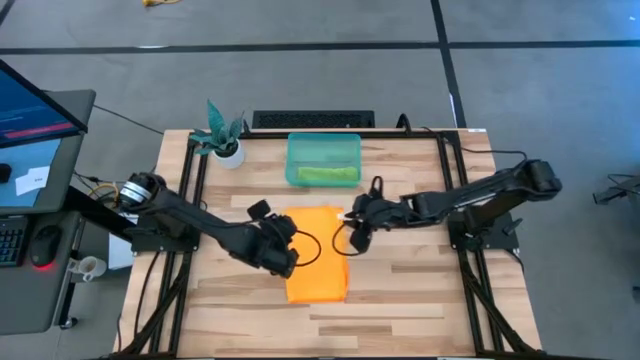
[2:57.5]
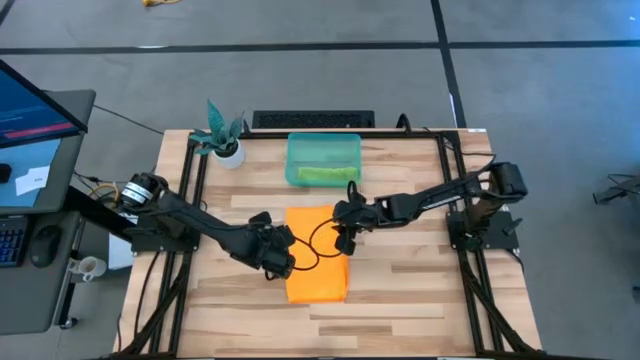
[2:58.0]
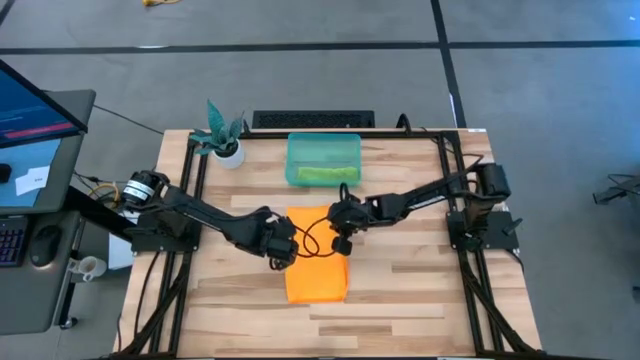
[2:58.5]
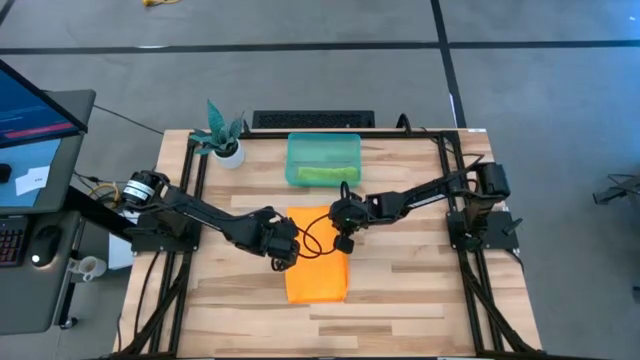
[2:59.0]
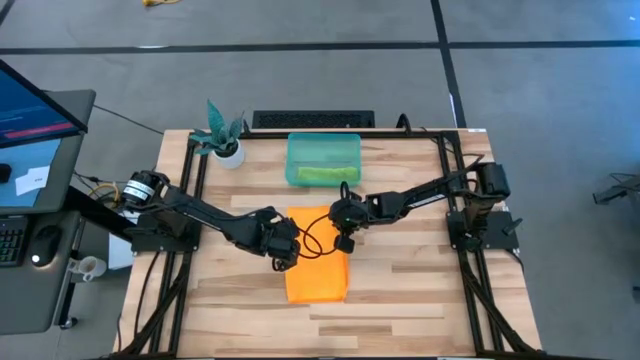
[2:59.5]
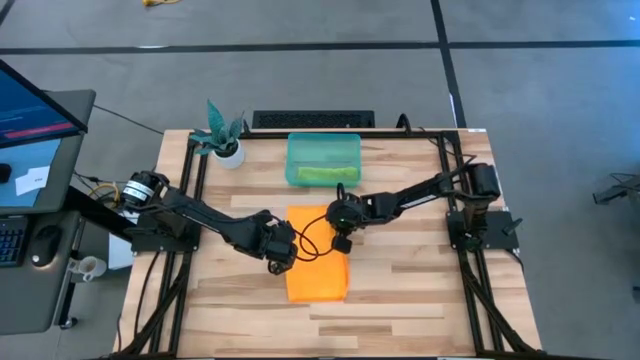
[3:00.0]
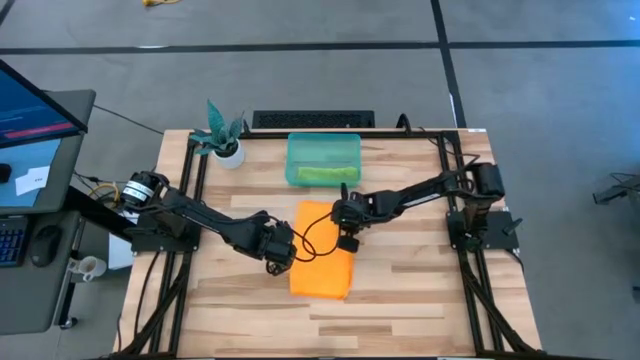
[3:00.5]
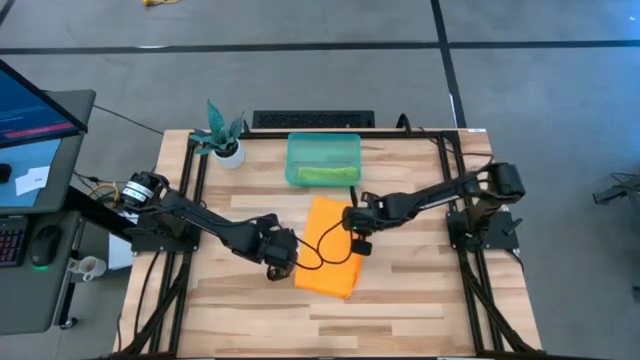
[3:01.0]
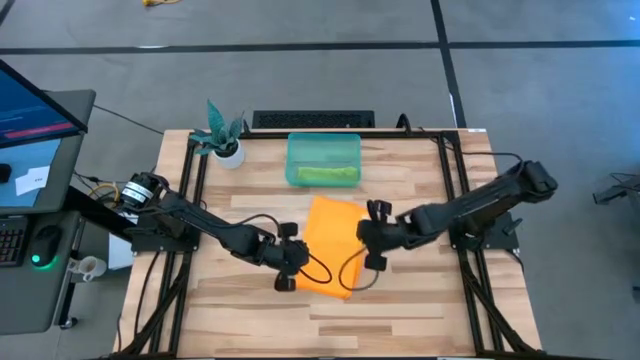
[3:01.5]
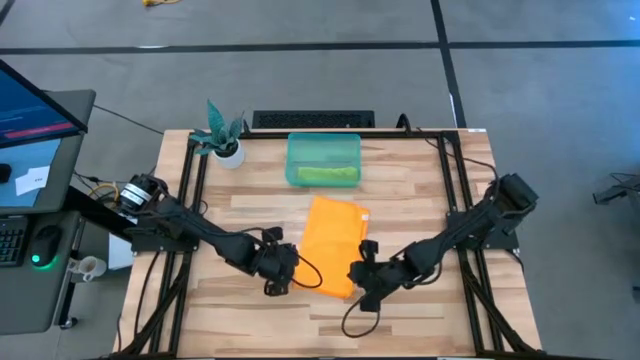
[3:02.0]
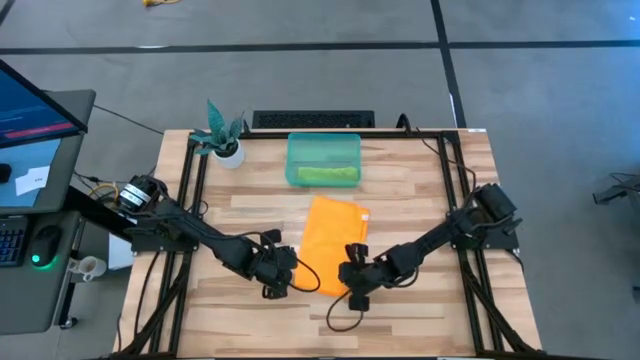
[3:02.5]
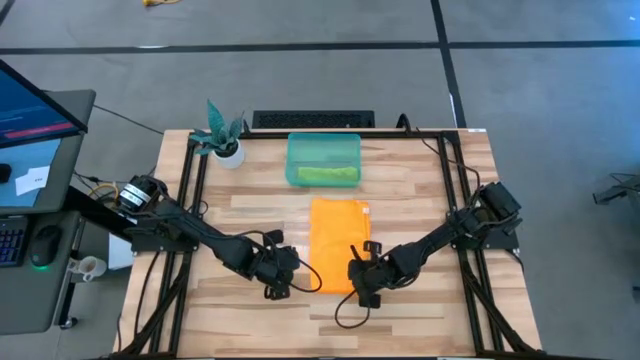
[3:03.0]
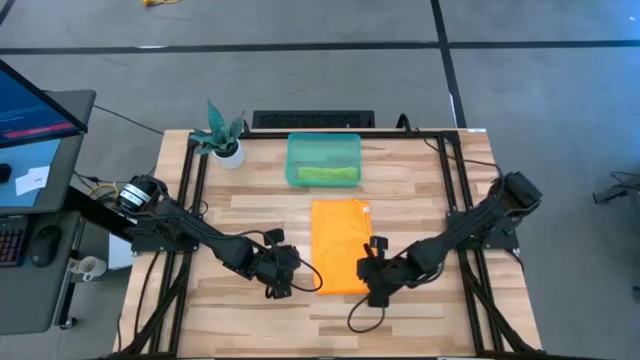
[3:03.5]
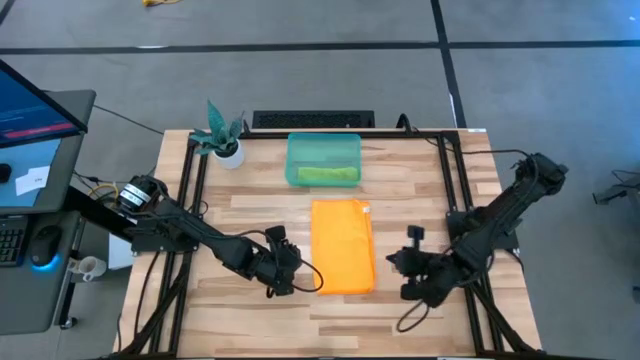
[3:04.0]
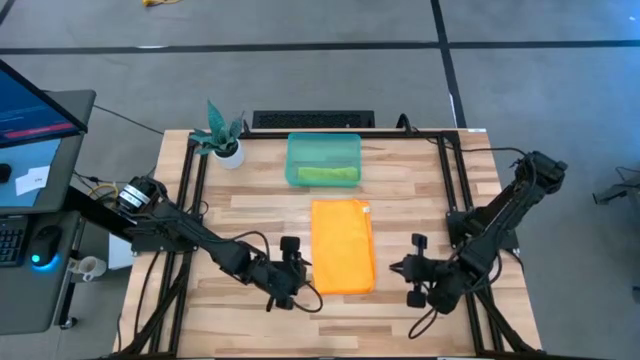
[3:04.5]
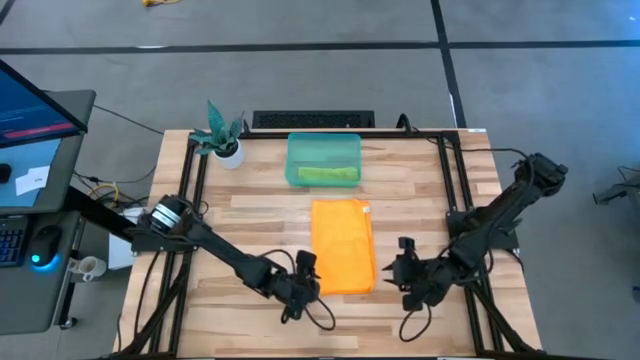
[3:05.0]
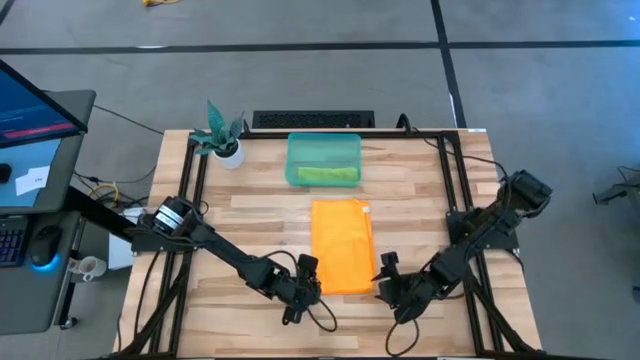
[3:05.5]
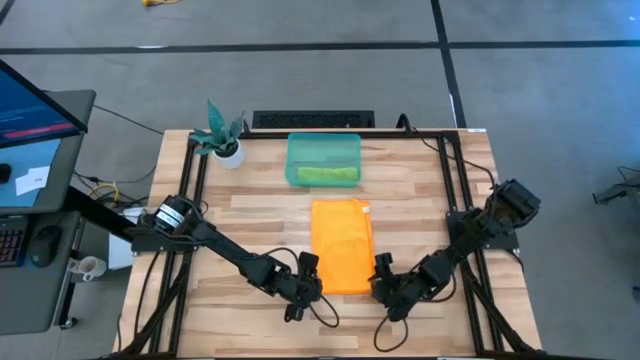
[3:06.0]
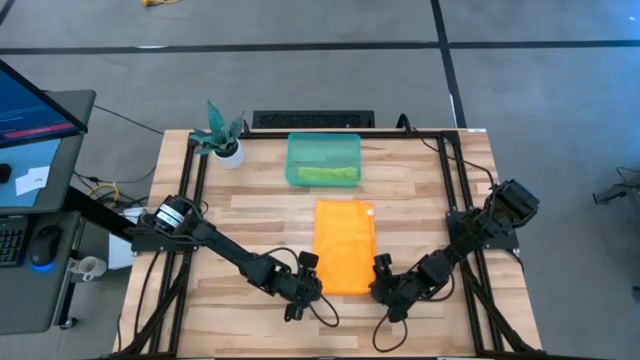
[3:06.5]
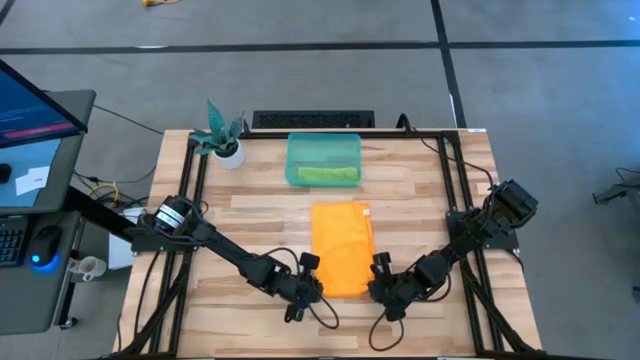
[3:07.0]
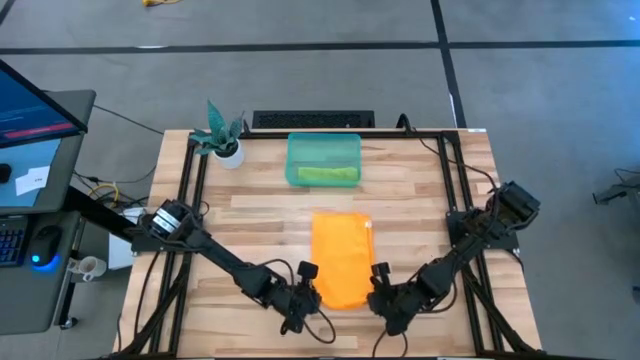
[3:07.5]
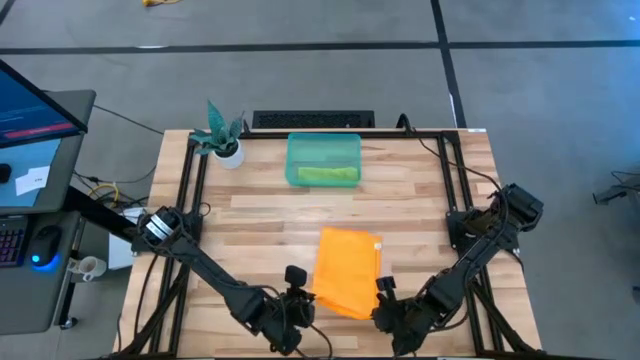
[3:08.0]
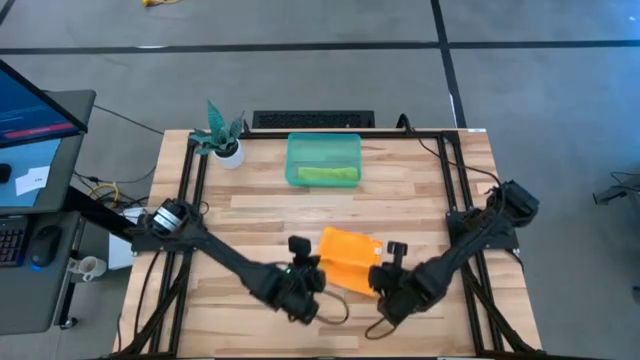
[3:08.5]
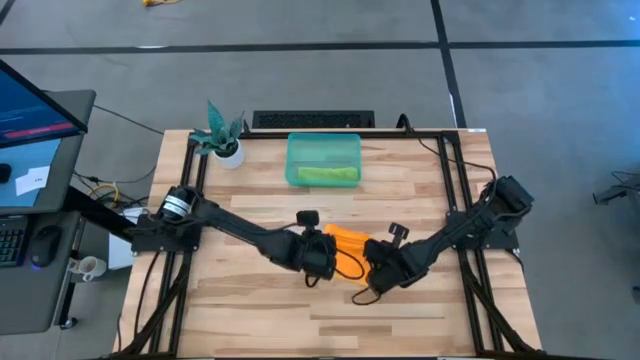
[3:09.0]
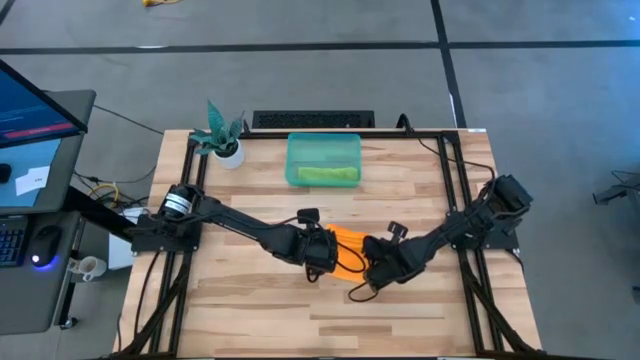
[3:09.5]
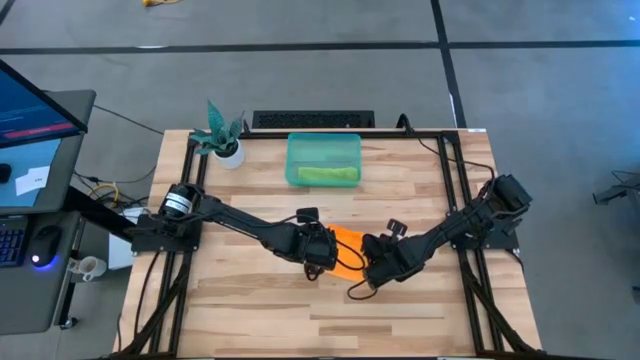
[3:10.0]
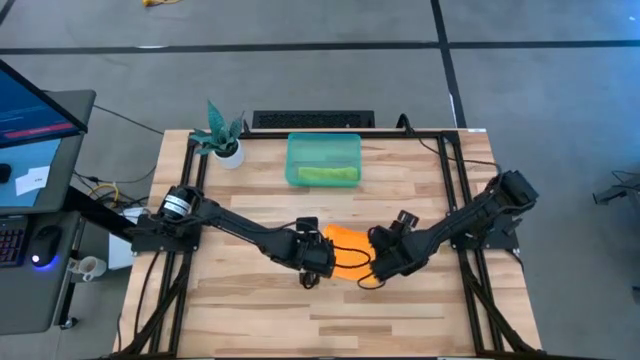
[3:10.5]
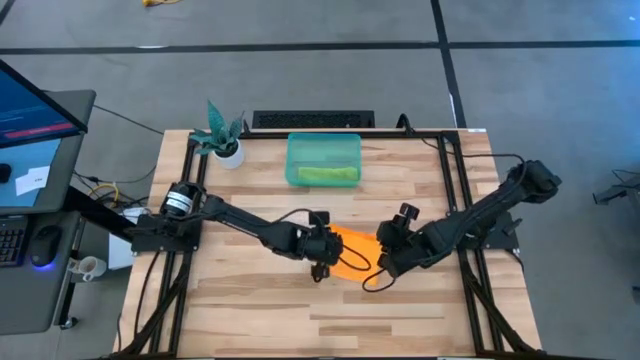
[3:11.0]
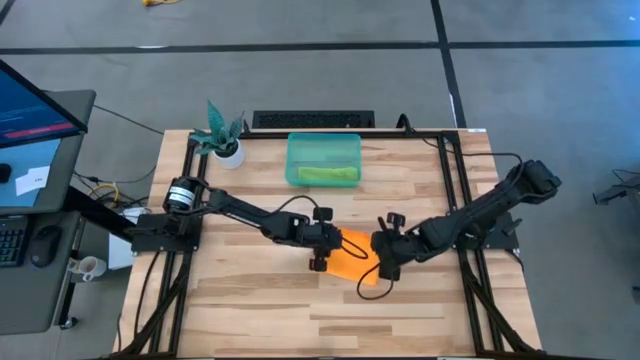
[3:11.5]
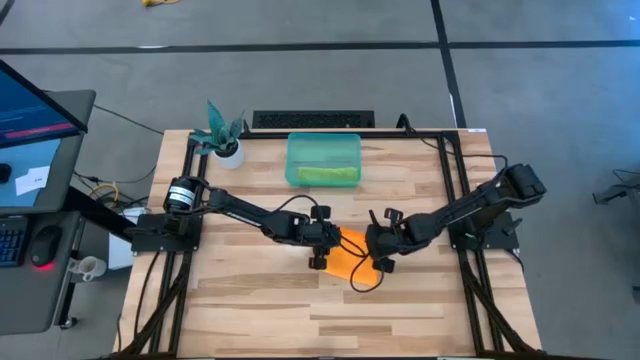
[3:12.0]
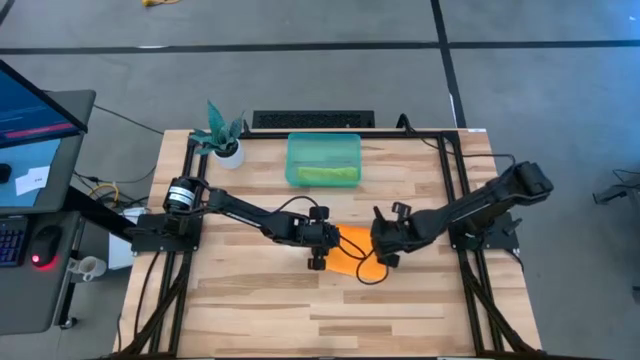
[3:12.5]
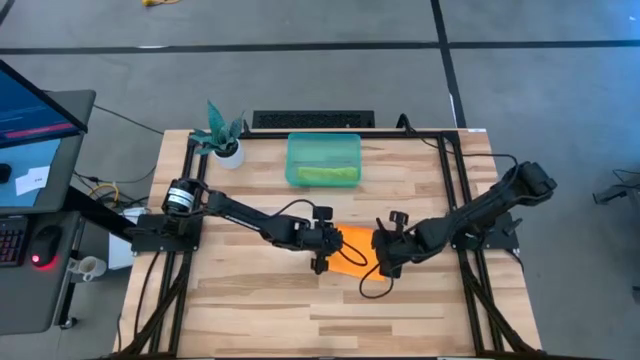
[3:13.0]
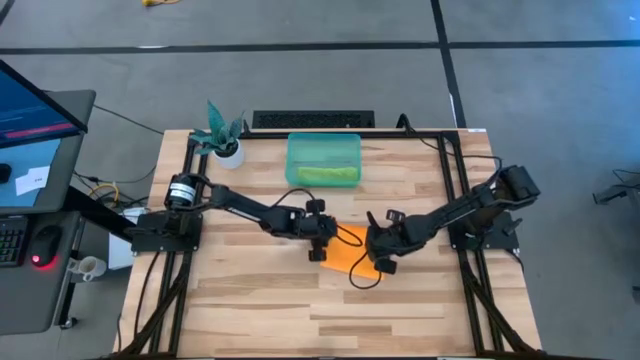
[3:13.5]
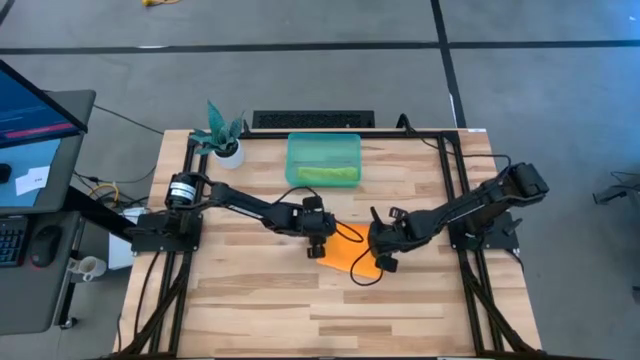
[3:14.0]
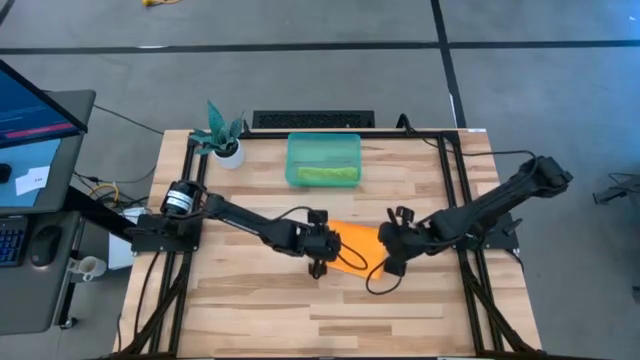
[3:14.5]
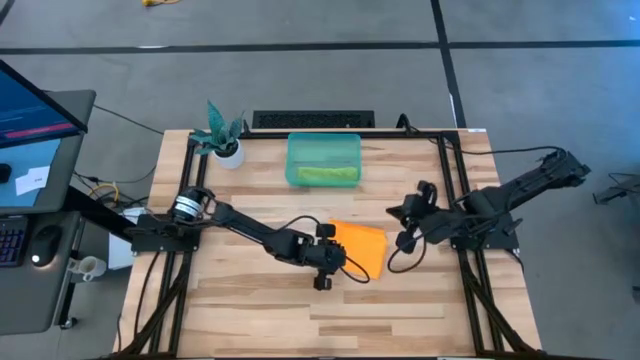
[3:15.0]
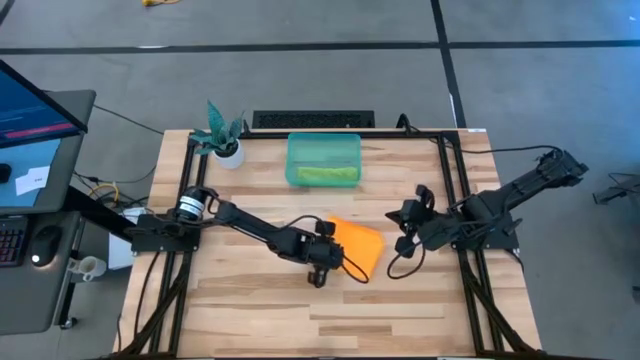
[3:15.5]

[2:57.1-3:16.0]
Task: Roll microfiber towels into tight, uniform cylinder then place into a basket
Fold the orange towel
